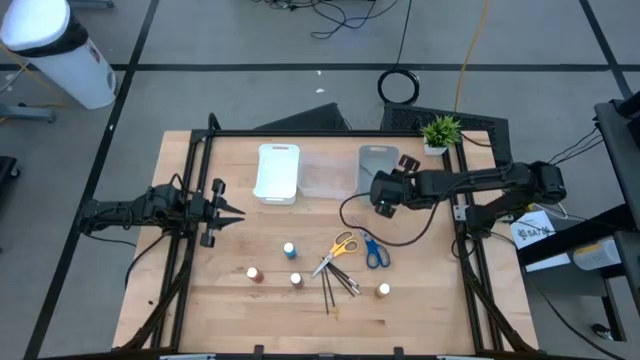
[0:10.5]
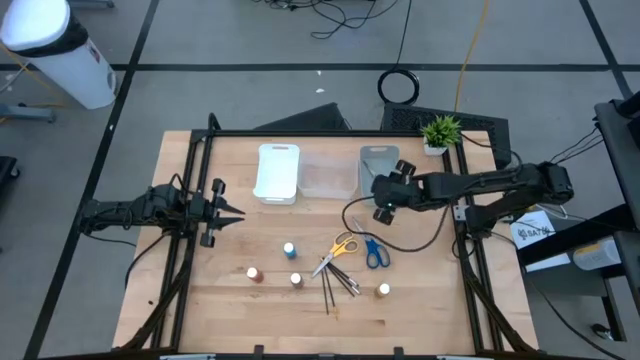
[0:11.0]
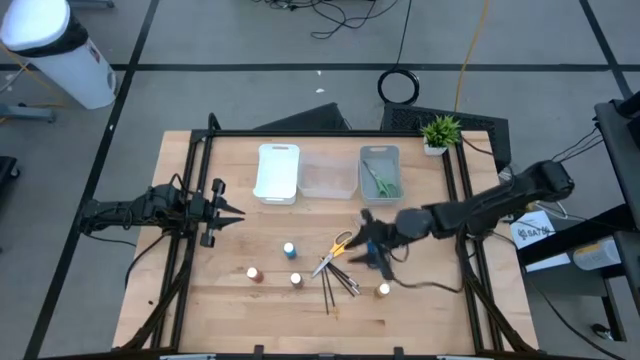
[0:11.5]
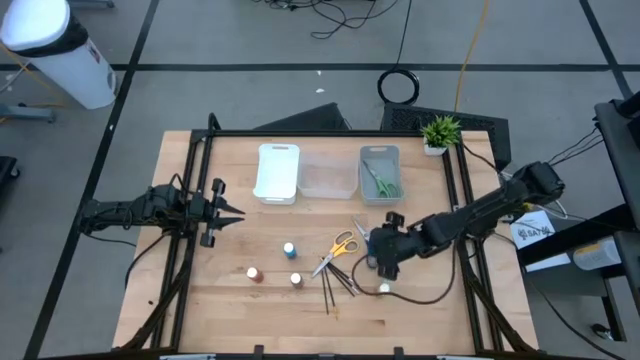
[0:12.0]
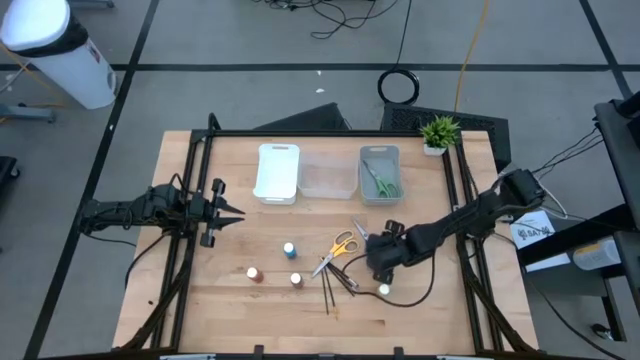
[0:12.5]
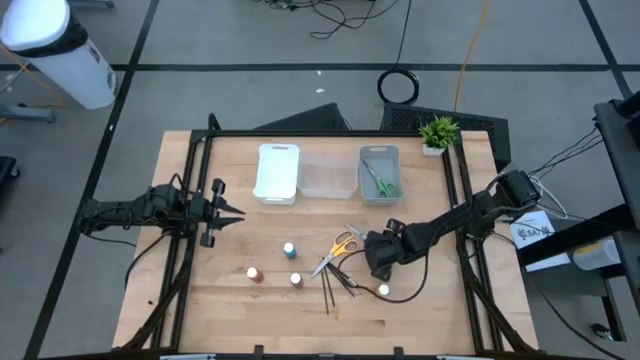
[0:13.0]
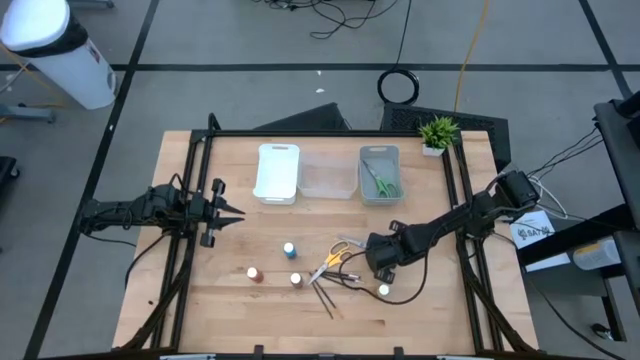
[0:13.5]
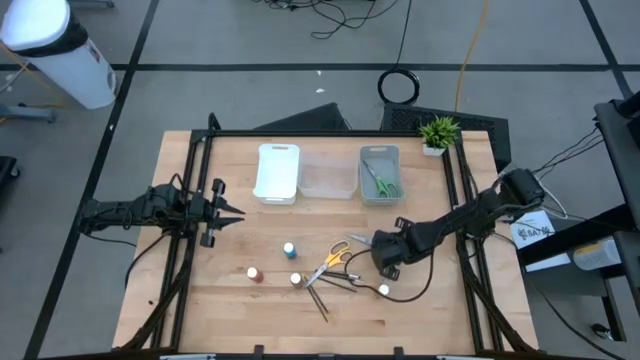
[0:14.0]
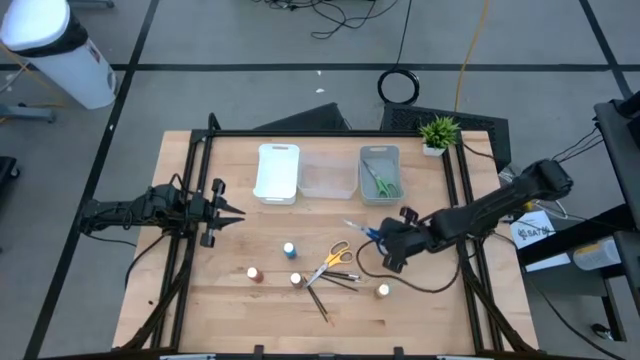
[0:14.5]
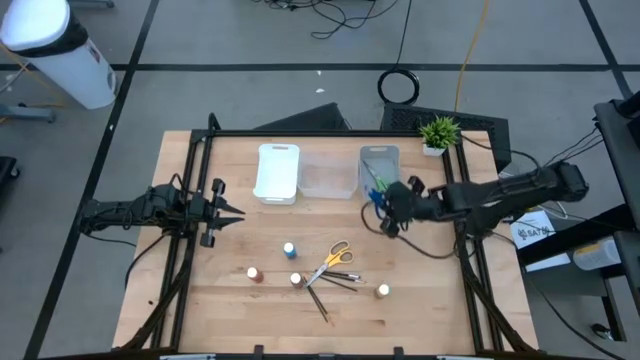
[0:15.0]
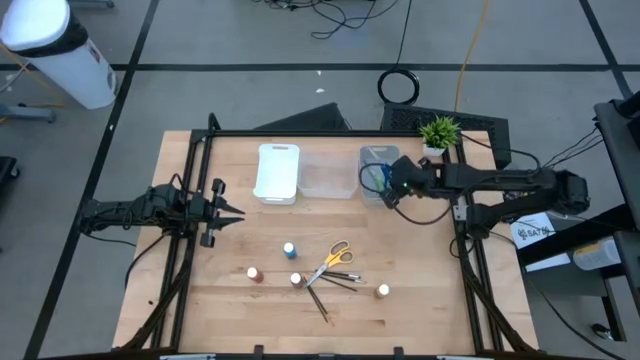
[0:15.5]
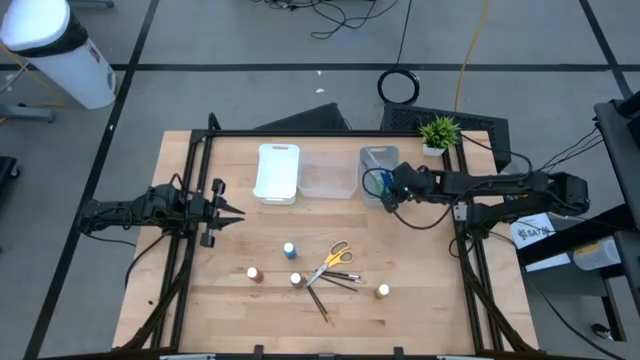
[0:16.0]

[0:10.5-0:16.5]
Task: Pick & Place Paint Supplies
Put the blue scissors in the gray bin

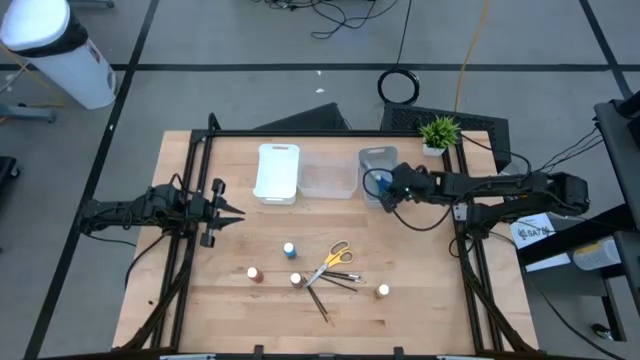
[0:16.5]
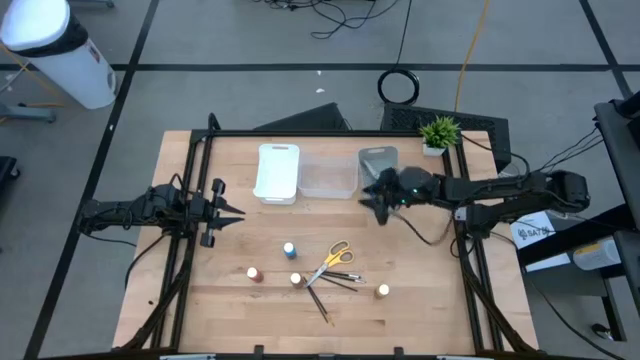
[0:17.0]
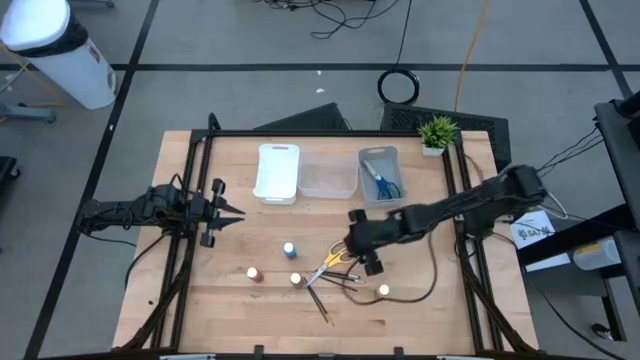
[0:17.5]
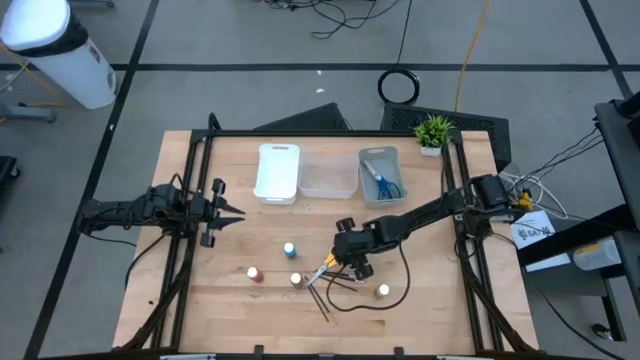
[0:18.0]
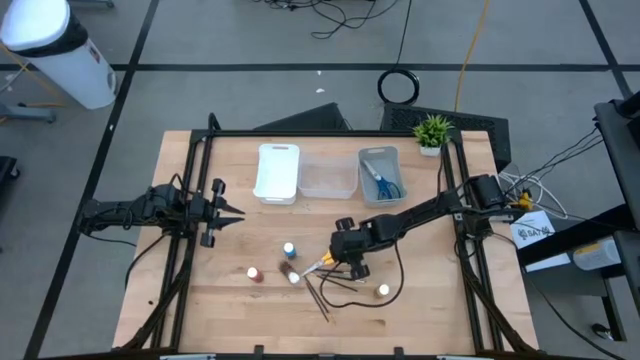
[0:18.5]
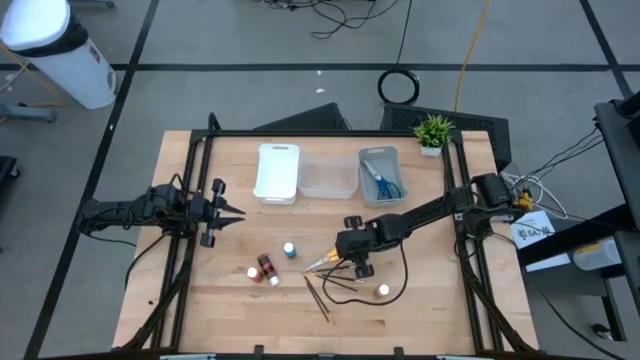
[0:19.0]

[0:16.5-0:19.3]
Put the yellow scissors in the gray bin

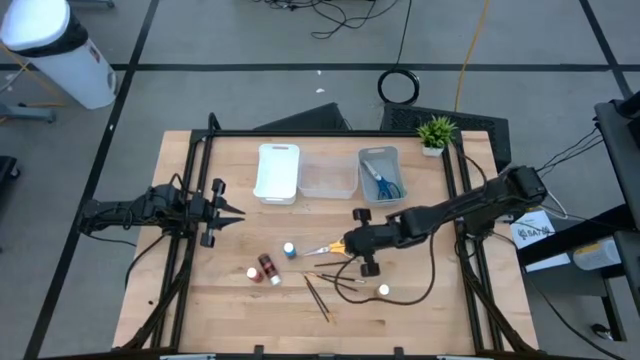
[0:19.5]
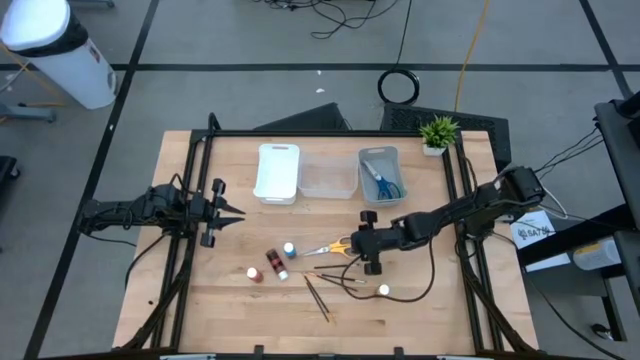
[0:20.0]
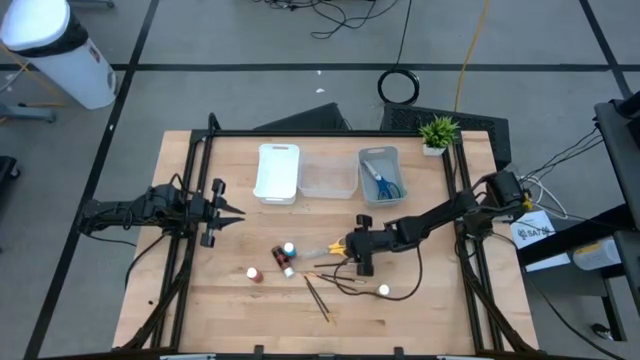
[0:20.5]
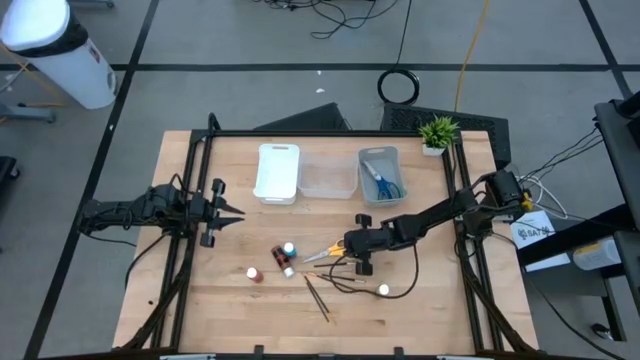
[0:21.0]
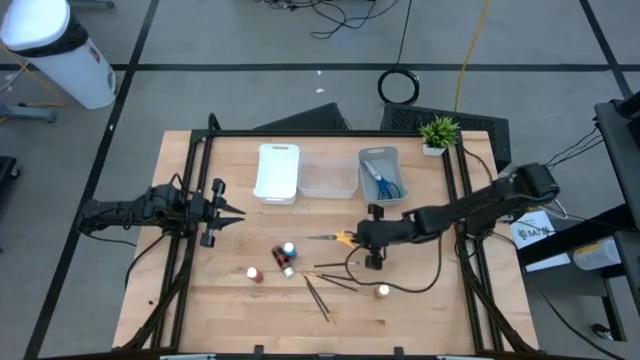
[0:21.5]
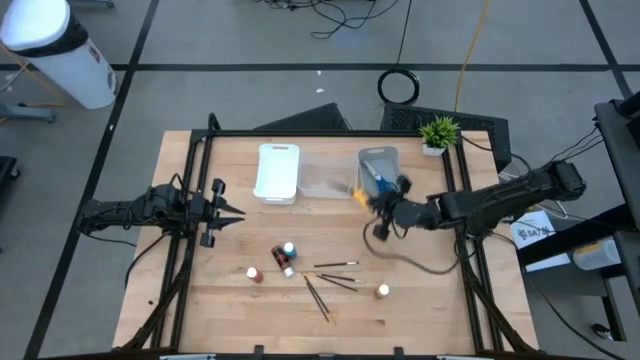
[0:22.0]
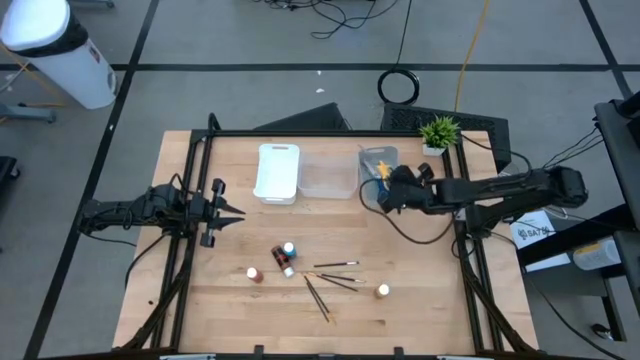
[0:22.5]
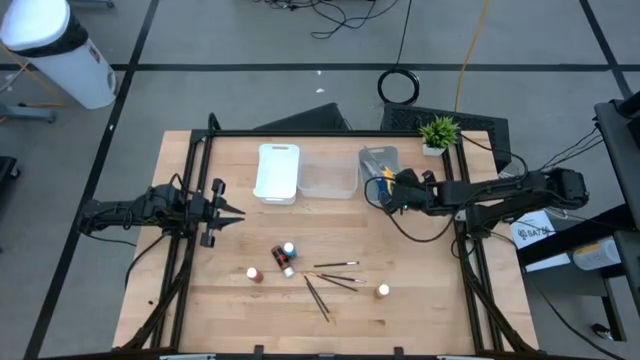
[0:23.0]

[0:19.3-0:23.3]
Put the yellow scissors in the gray bin

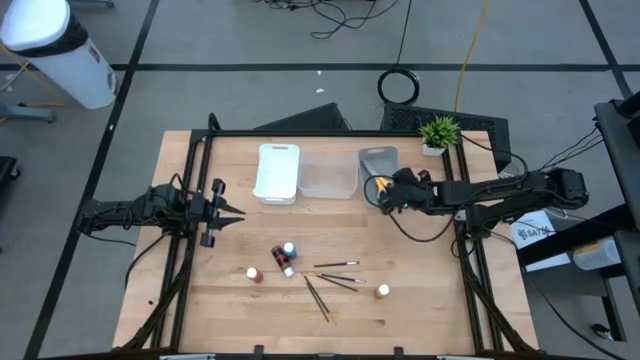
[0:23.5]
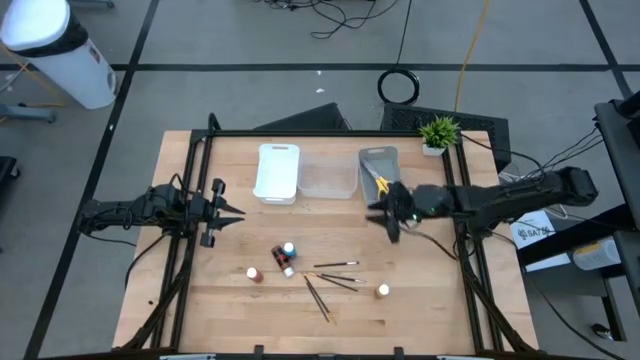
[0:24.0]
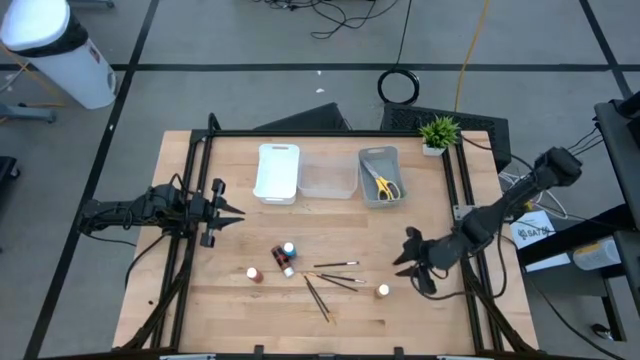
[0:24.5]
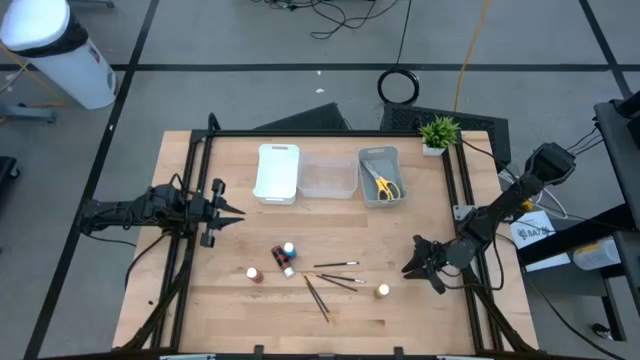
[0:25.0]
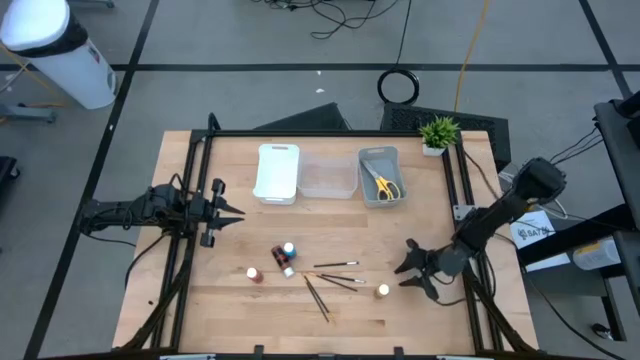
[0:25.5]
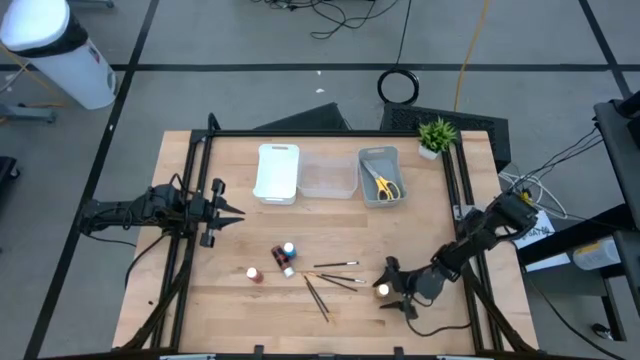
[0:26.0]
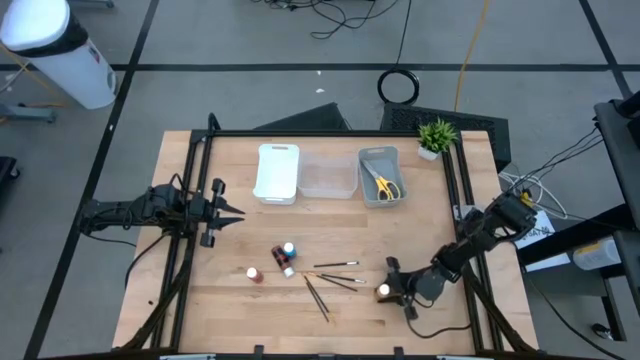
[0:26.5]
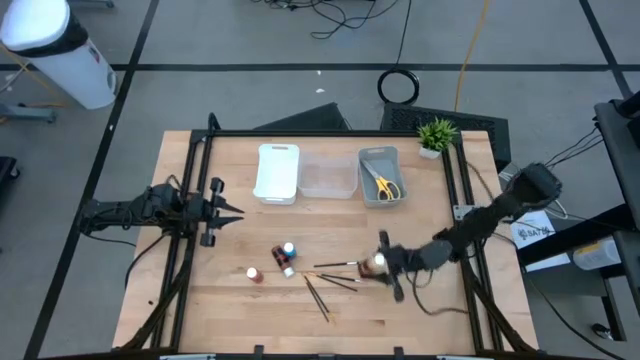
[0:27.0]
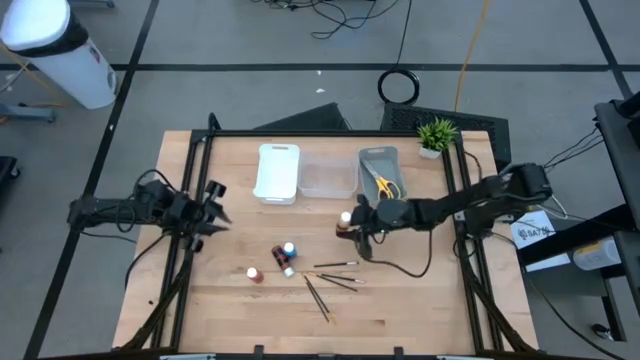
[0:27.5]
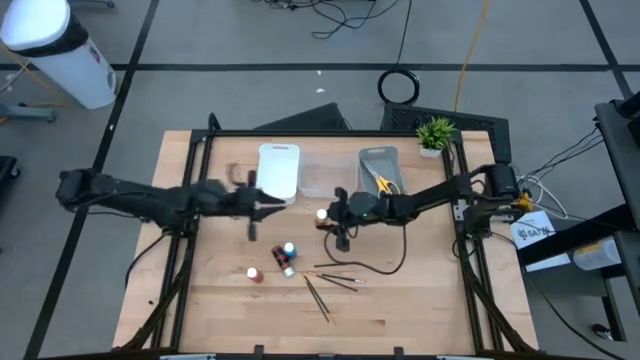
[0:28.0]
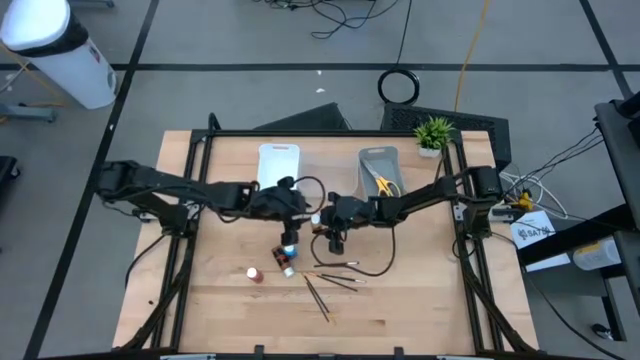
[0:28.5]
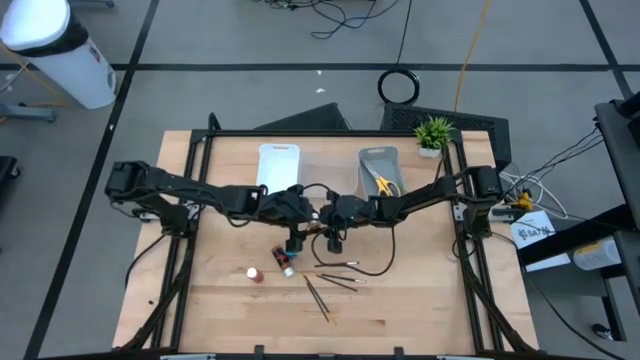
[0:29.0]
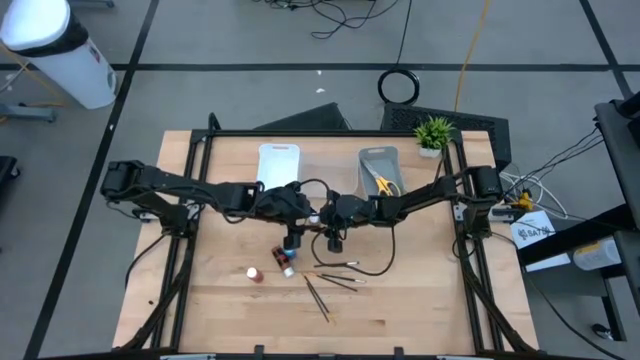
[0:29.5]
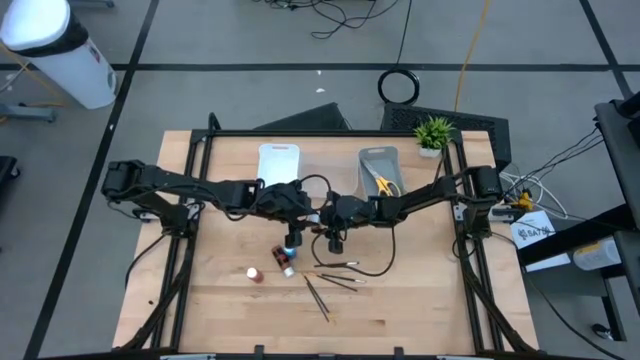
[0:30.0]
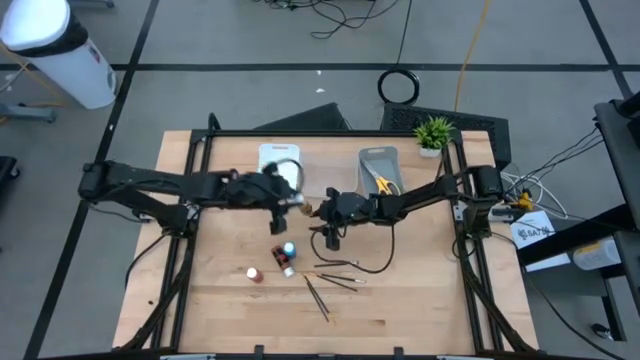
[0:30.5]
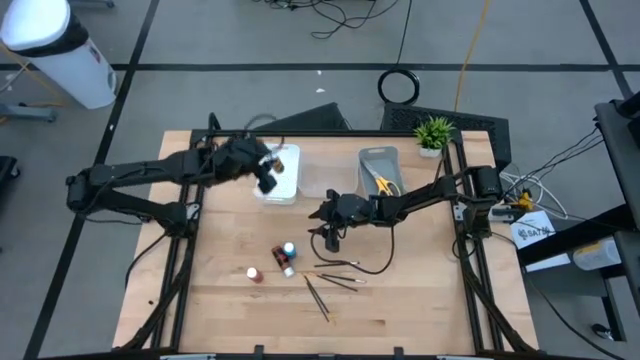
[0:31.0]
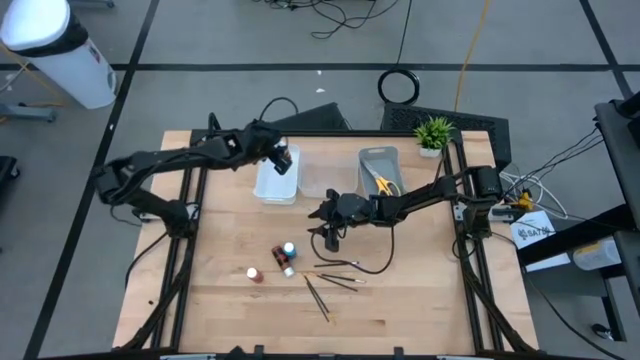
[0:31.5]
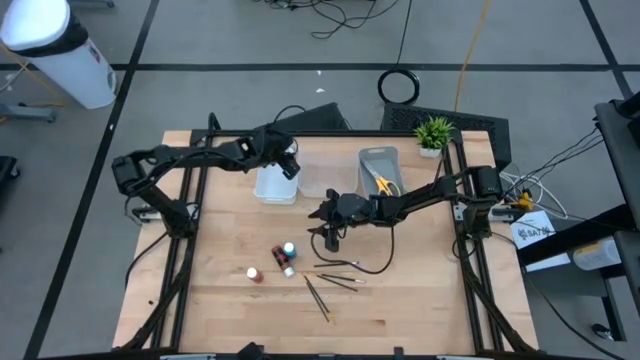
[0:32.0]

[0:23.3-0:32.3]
Put the yellow paint bottle in the white bin
